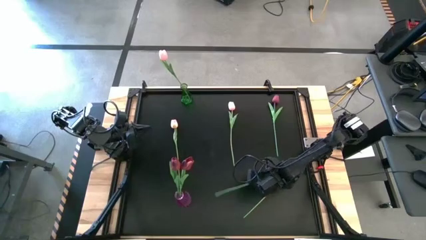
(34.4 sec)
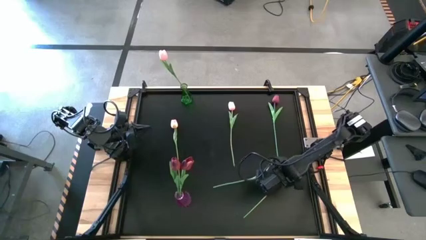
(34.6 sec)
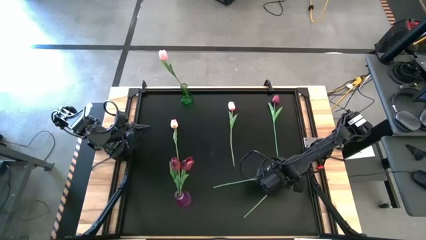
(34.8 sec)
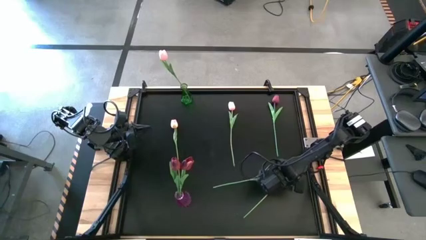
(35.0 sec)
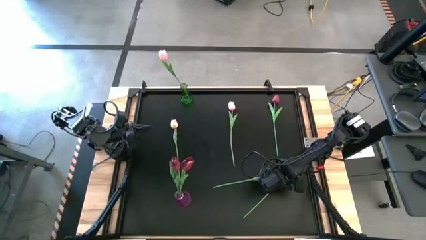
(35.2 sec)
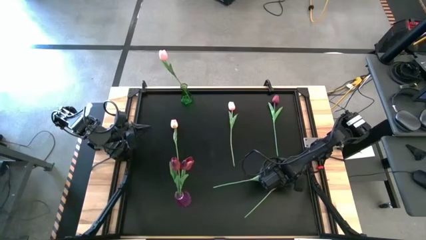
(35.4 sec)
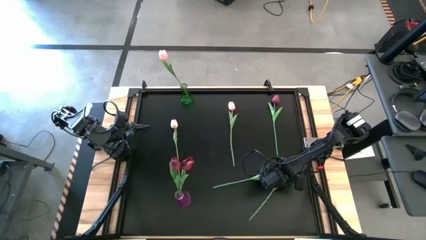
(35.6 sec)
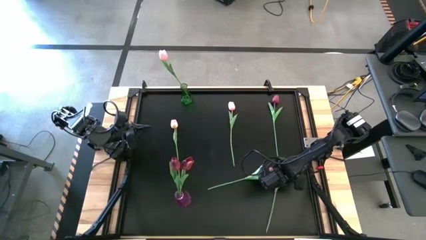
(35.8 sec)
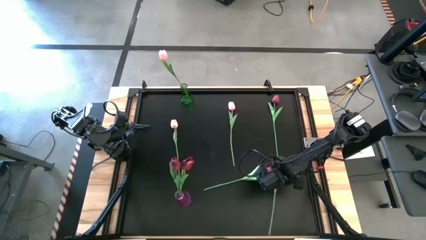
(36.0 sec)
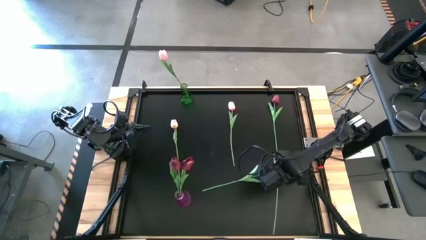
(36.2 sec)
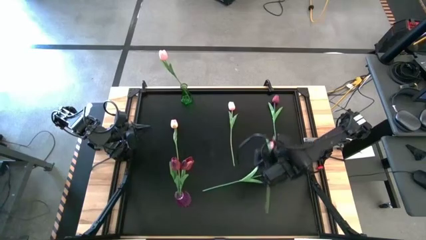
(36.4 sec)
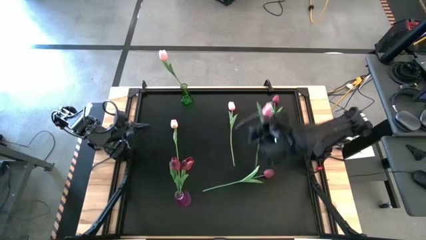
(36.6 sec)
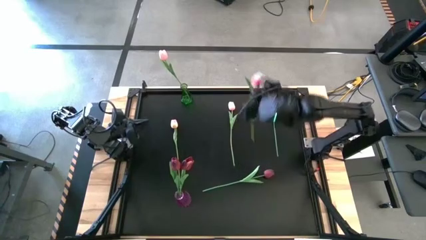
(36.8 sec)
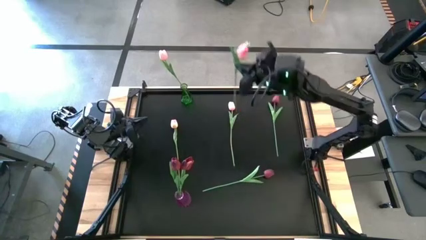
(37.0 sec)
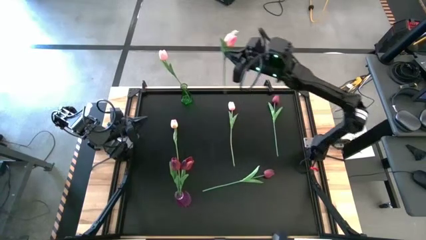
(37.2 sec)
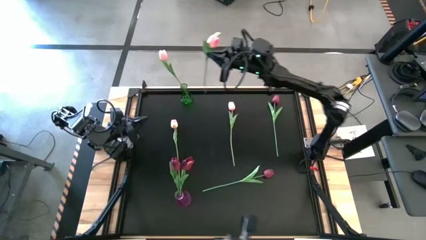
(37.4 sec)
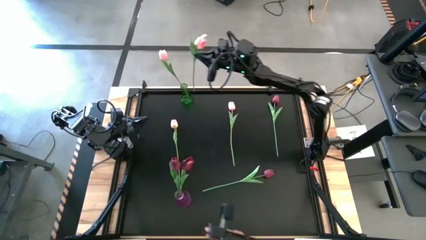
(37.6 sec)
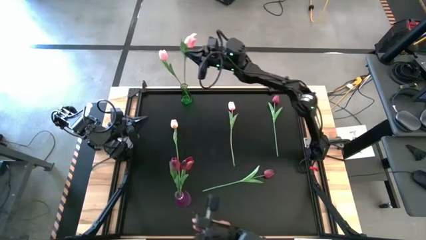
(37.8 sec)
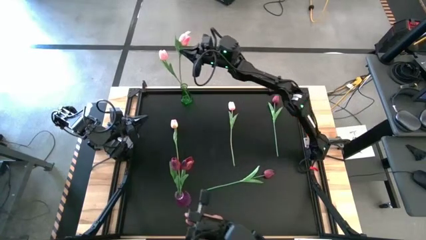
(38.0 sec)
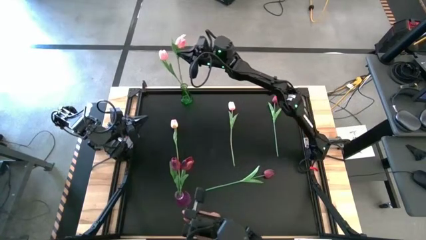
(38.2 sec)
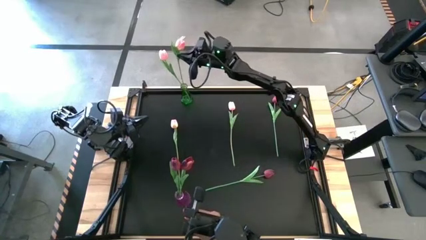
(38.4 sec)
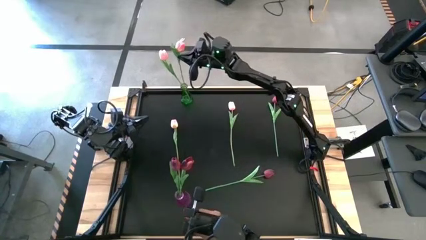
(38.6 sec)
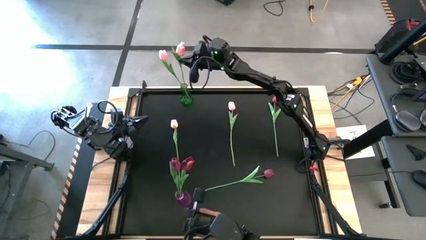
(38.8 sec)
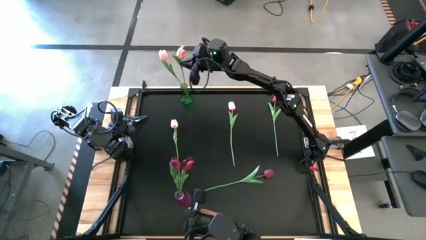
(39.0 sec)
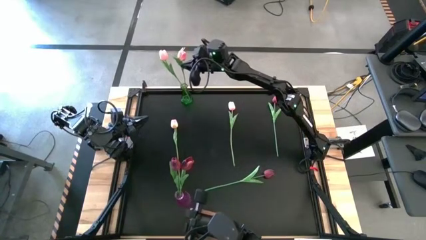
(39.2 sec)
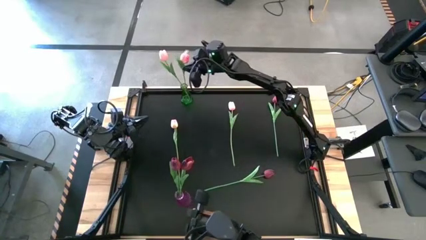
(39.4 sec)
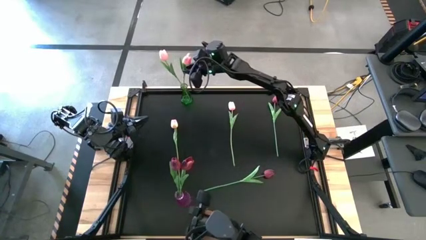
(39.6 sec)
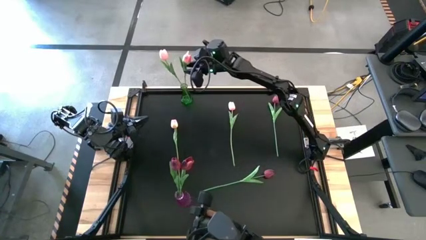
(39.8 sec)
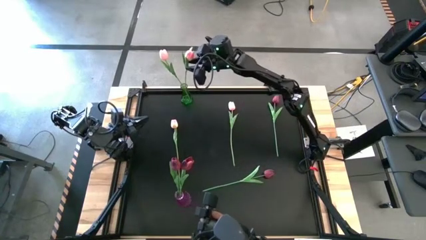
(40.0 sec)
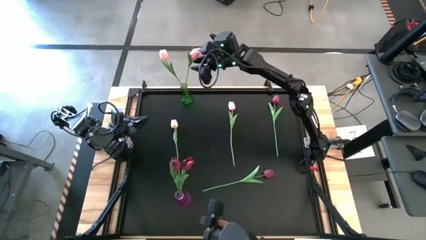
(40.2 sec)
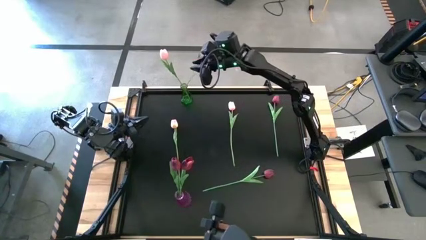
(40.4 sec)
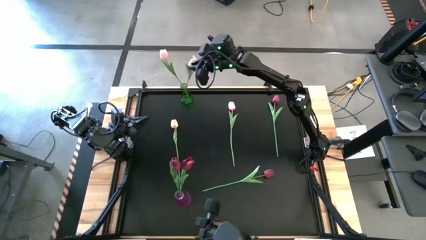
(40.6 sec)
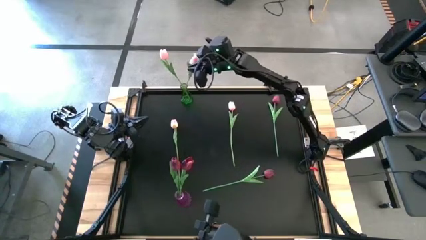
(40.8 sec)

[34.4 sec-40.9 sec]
Task: Sort flowers into vase by color
Put the bottom pink tulip into the green vase

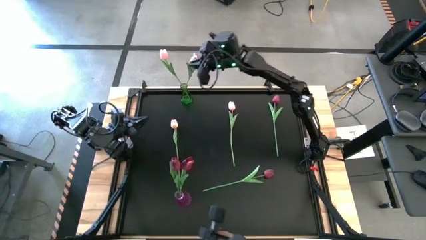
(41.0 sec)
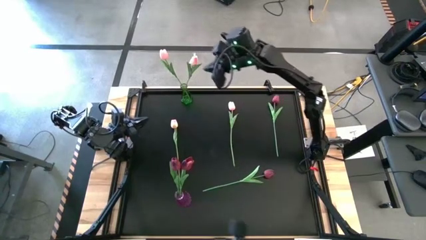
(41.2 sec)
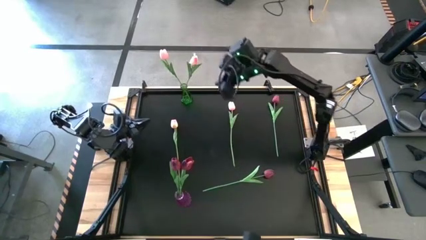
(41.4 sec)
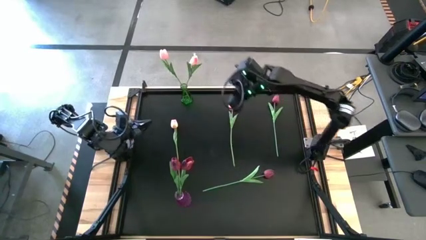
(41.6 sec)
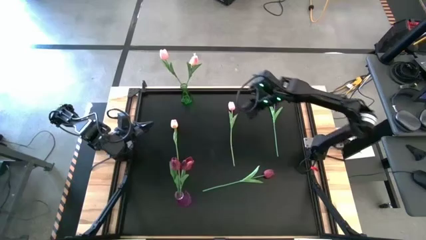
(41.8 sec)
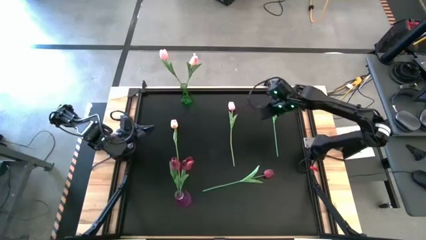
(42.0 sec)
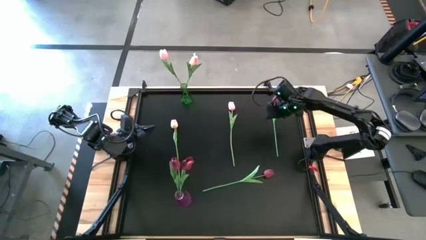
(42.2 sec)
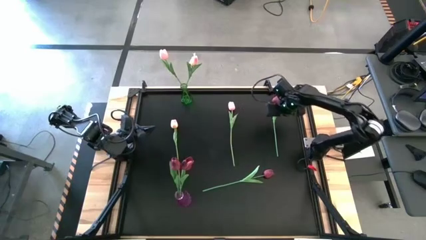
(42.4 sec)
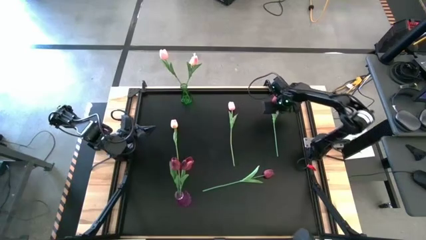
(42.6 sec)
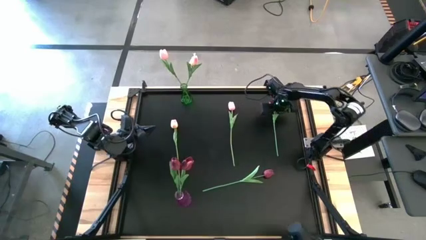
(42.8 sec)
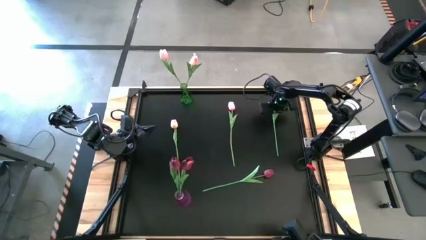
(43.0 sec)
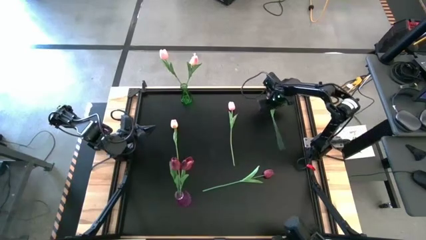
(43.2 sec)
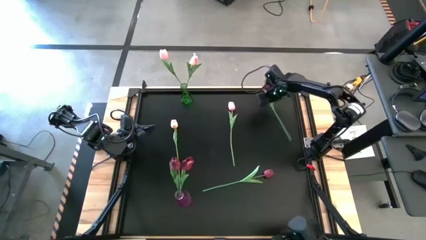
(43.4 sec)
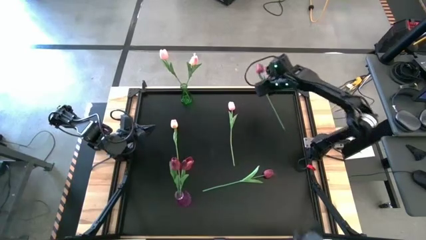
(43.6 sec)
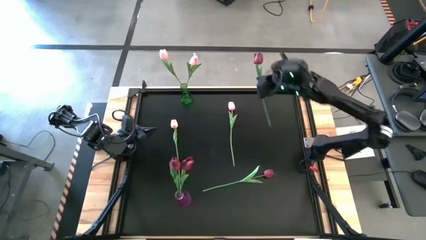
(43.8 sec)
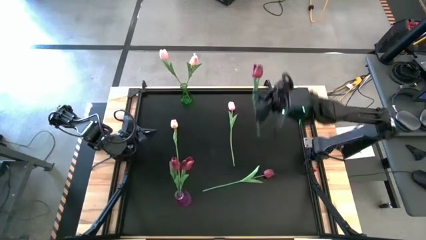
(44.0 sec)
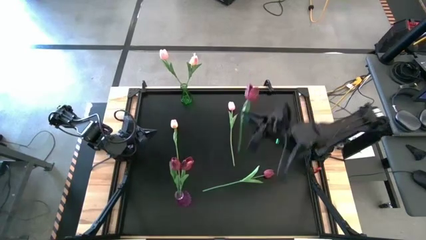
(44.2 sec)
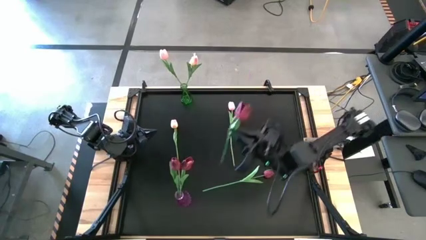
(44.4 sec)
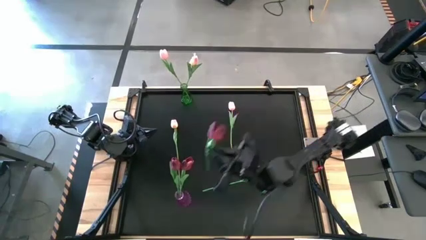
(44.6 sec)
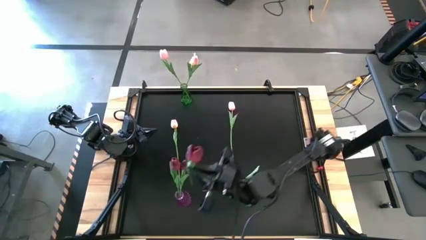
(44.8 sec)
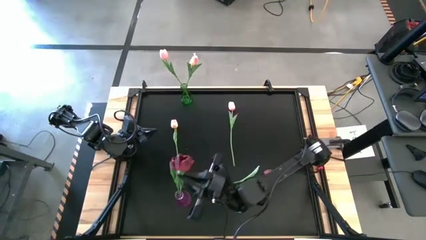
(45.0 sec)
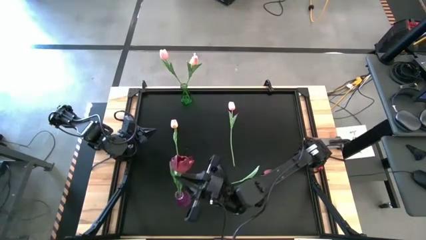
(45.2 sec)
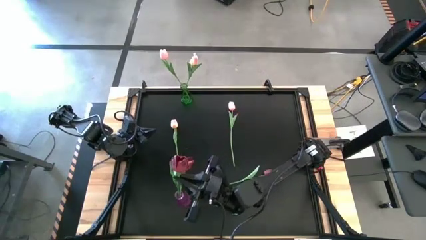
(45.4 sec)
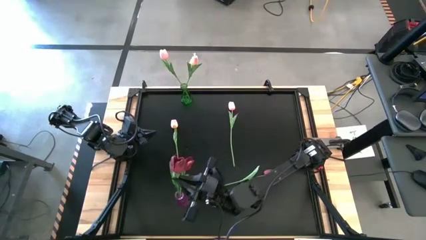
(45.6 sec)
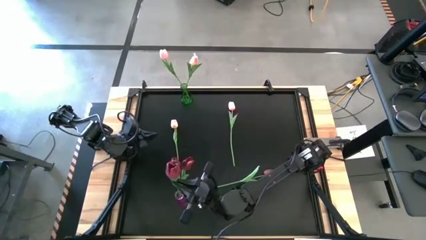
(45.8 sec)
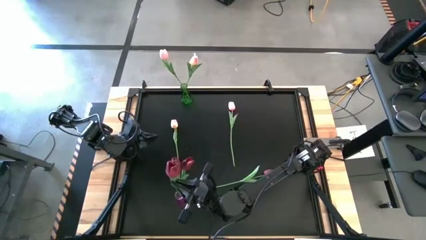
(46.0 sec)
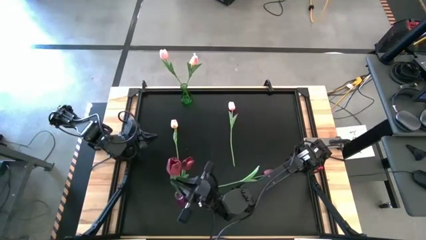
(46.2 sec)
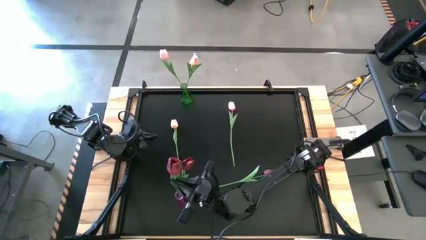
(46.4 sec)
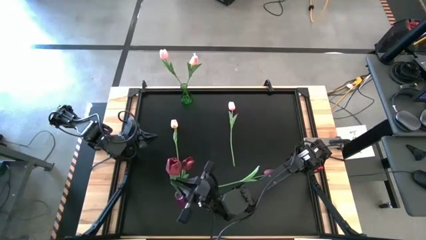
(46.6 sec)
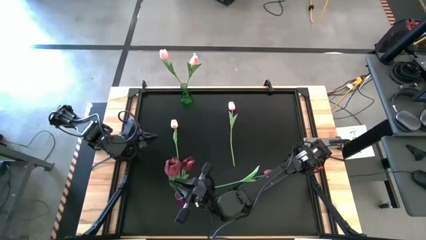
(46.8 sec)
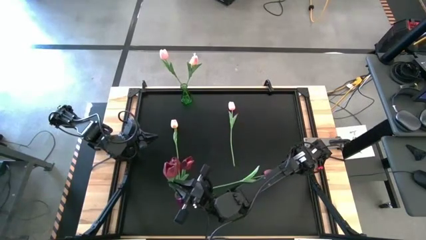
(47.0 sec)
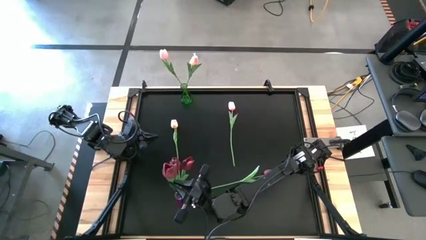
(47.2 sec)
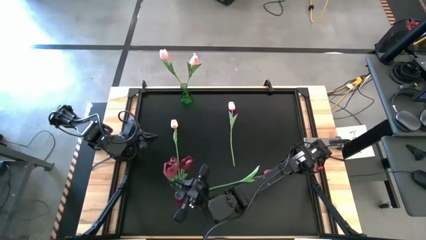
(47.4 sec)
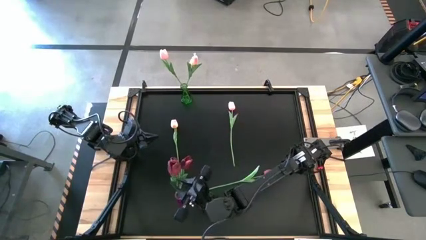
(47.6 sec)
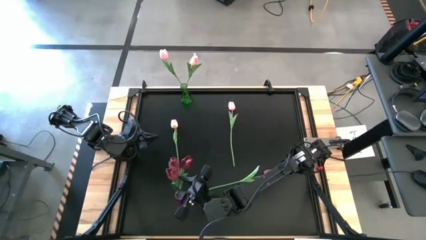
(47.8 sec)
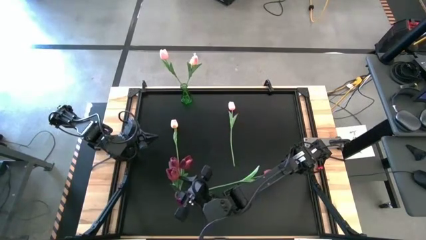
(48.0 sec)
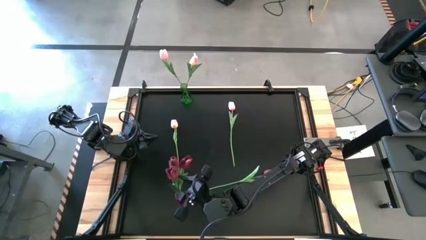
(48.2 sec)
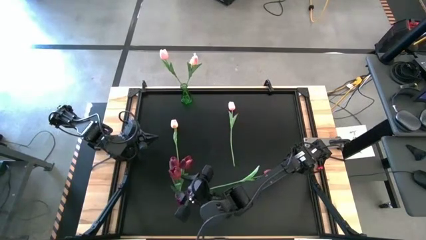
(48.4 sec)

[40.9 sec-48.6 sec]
Put the top red tulip into the purple vase

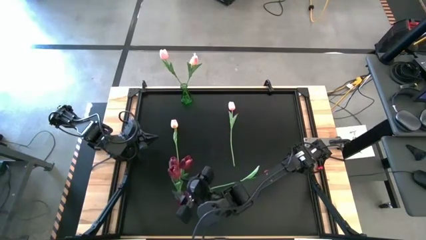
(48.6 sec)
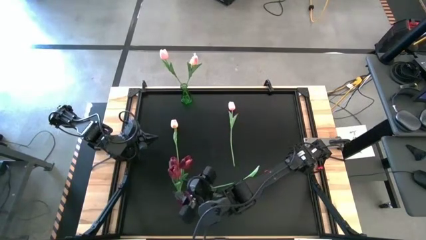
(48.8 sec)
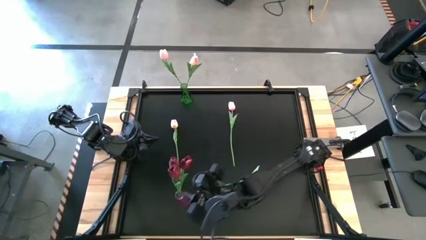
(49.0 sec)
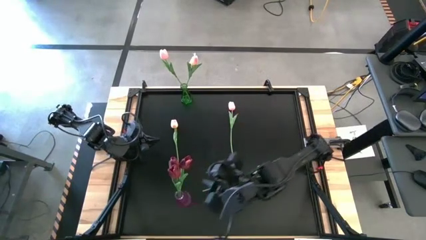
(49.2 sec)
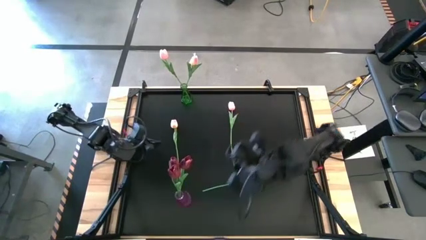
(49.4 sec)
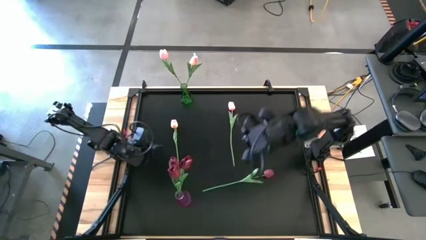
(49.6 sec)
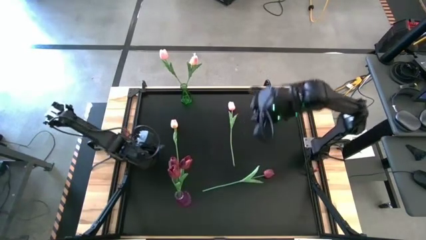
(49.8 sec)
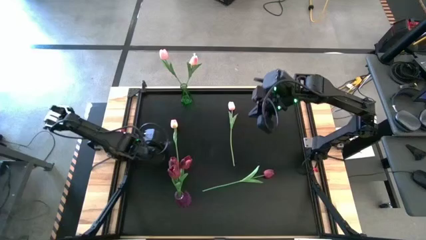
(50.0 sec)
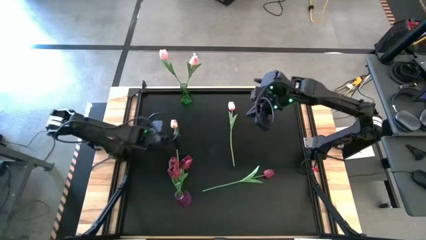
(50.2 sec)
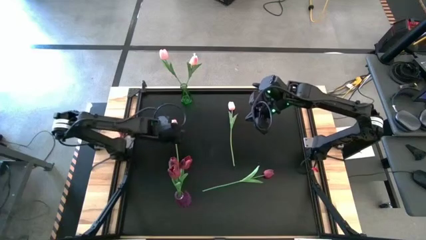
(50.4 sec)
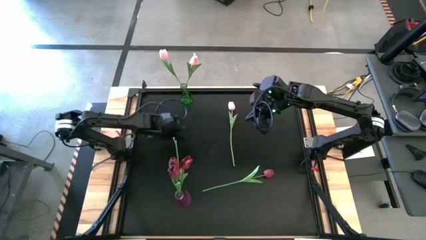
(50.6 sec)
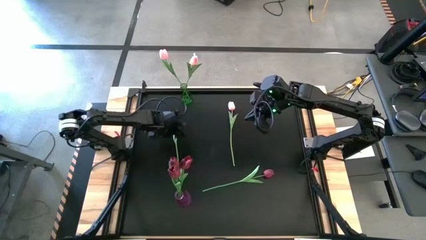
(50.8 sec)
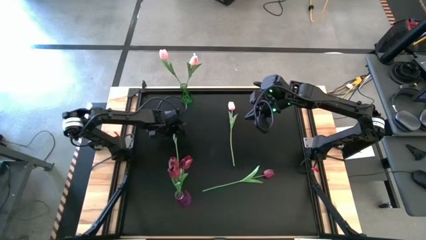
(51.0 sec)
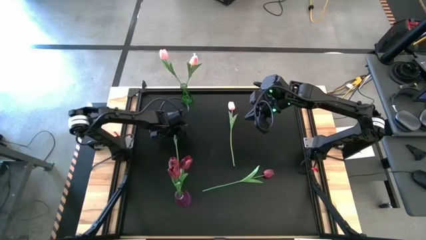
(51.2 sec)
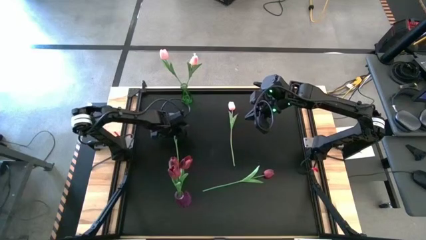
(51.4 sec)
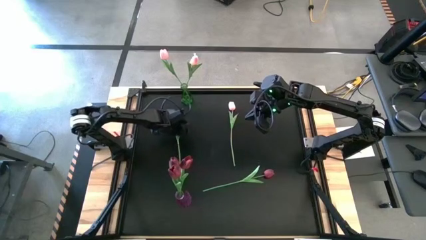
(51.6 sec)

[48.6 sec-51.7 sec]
Put the left pink tulip into the green vase
